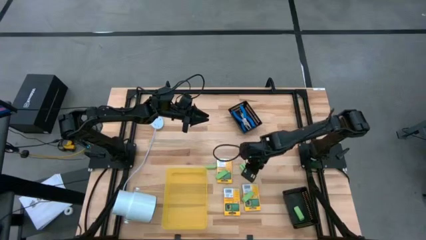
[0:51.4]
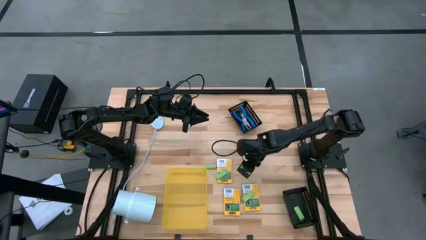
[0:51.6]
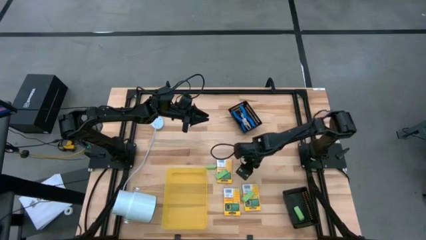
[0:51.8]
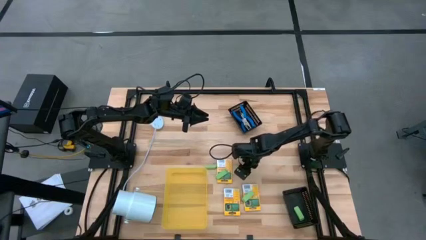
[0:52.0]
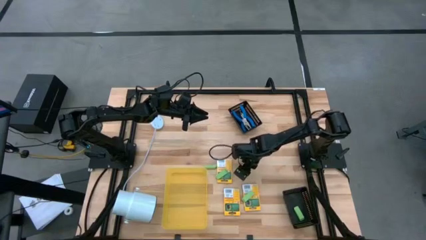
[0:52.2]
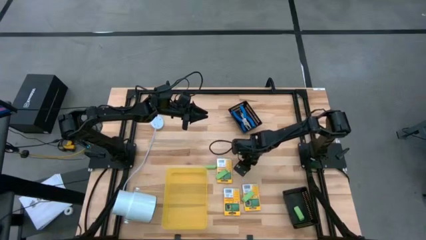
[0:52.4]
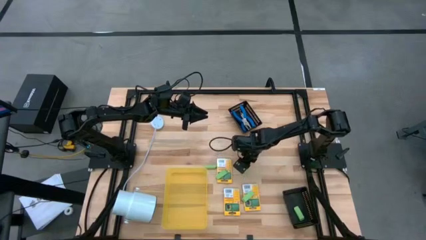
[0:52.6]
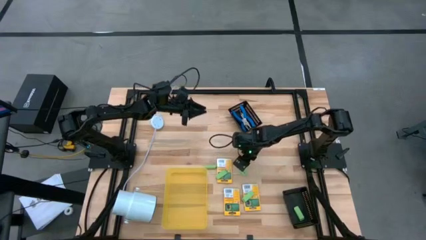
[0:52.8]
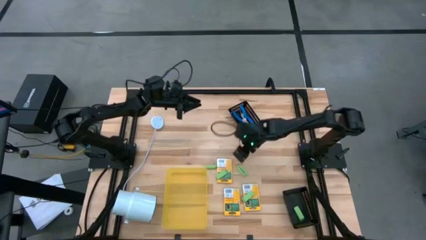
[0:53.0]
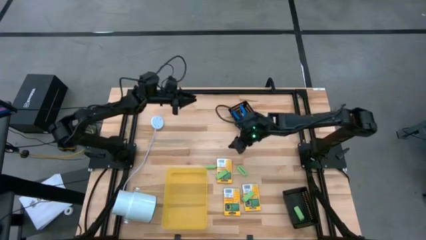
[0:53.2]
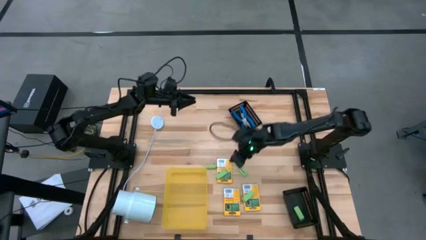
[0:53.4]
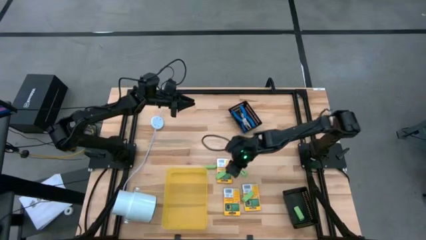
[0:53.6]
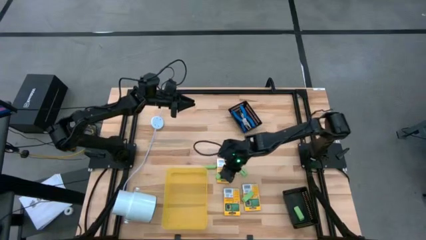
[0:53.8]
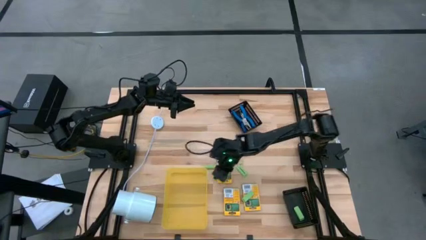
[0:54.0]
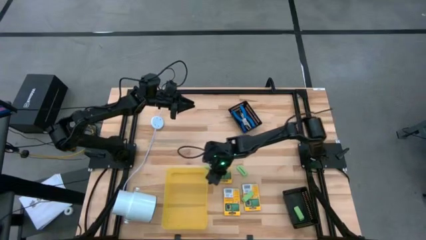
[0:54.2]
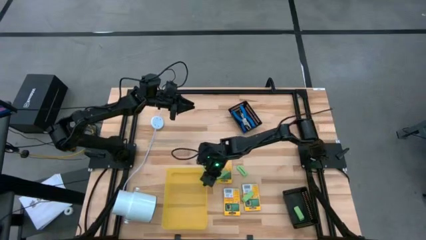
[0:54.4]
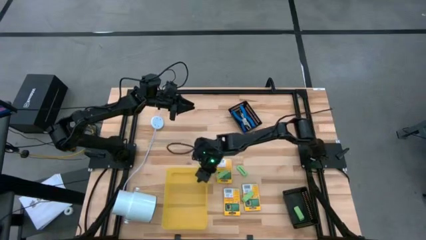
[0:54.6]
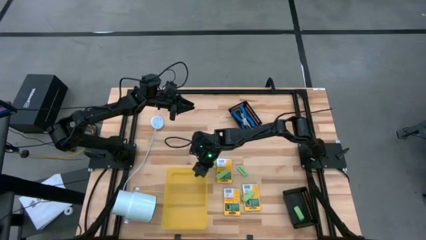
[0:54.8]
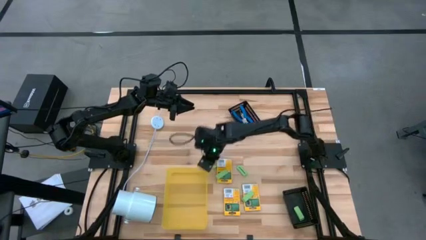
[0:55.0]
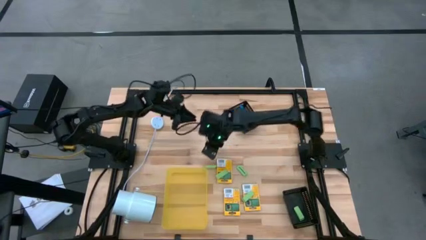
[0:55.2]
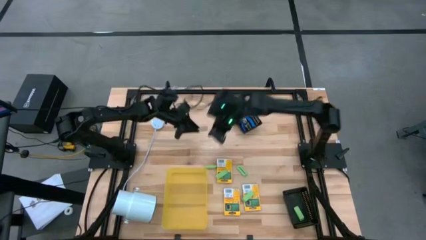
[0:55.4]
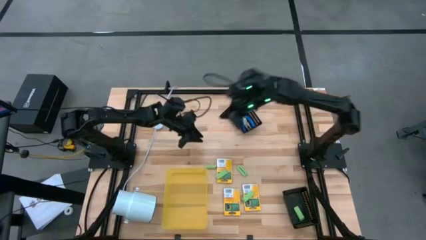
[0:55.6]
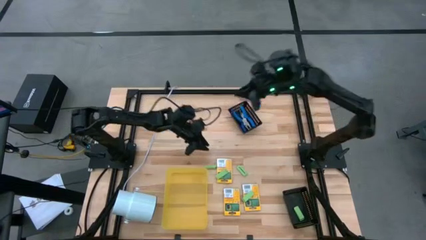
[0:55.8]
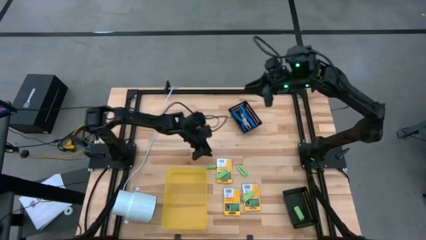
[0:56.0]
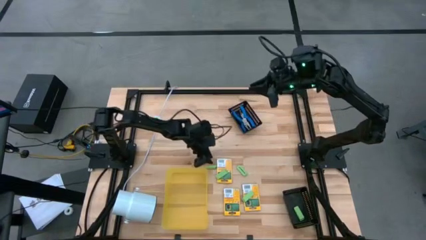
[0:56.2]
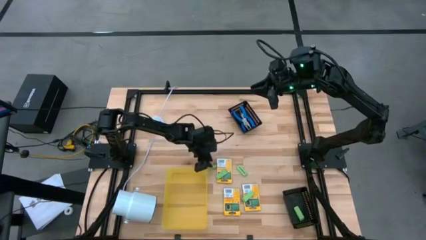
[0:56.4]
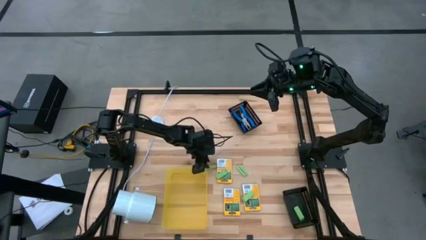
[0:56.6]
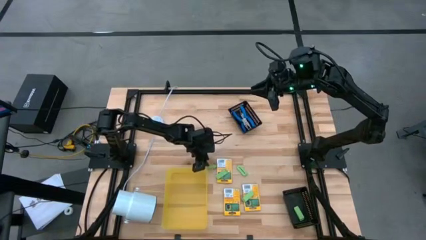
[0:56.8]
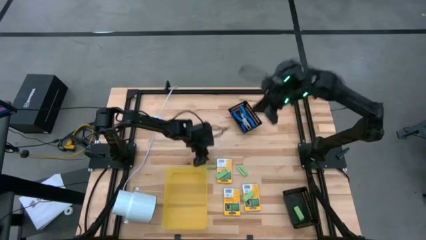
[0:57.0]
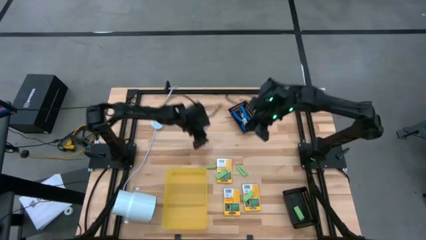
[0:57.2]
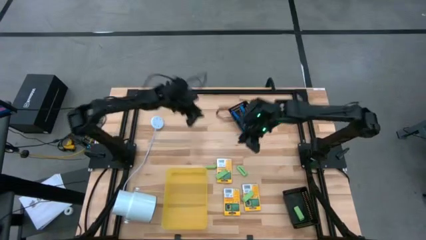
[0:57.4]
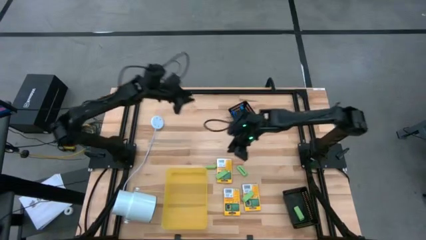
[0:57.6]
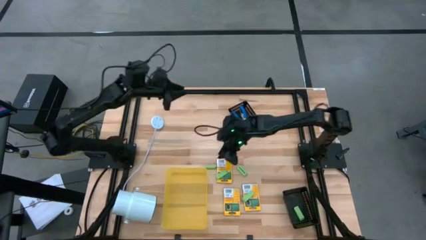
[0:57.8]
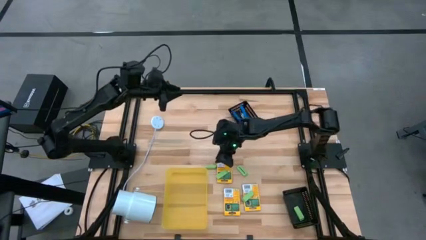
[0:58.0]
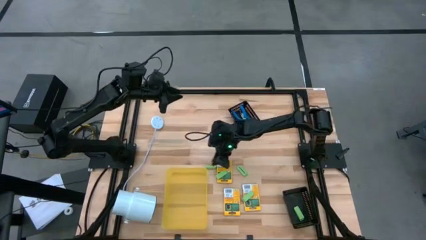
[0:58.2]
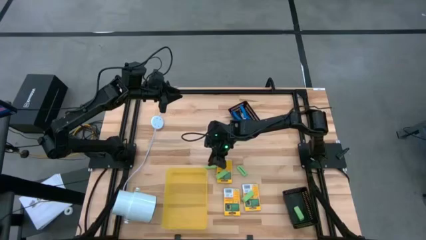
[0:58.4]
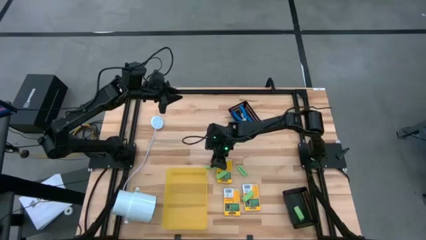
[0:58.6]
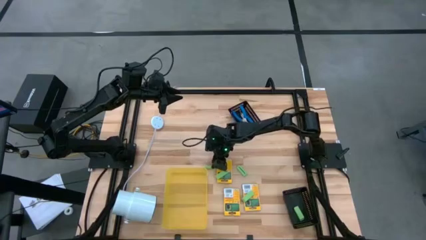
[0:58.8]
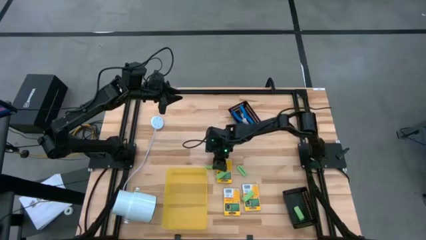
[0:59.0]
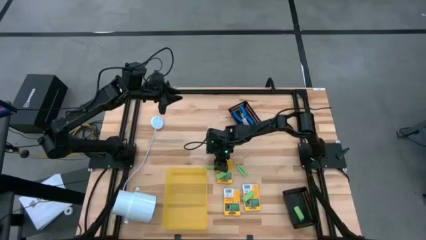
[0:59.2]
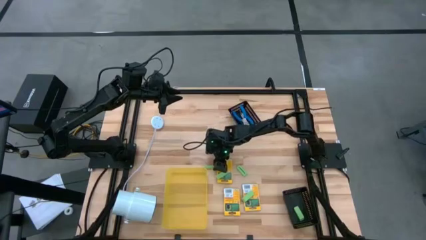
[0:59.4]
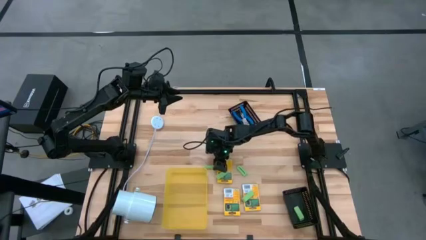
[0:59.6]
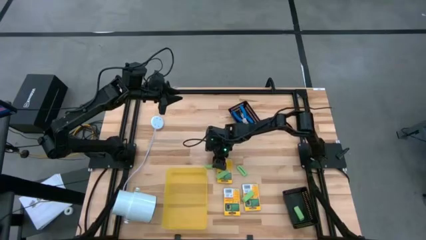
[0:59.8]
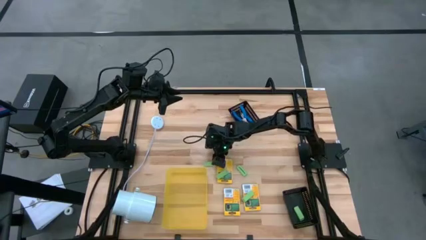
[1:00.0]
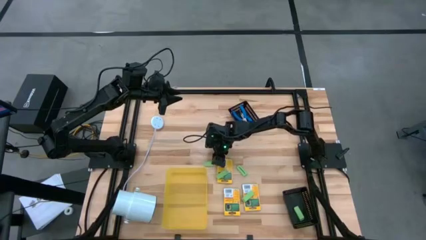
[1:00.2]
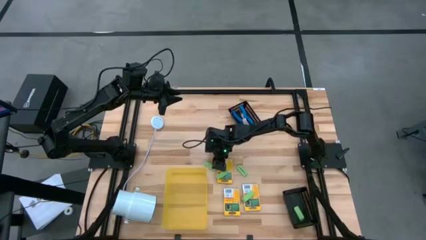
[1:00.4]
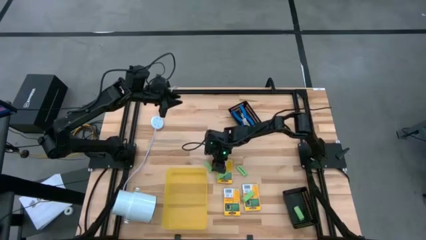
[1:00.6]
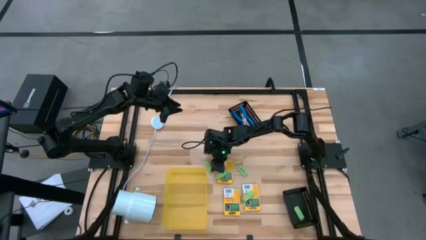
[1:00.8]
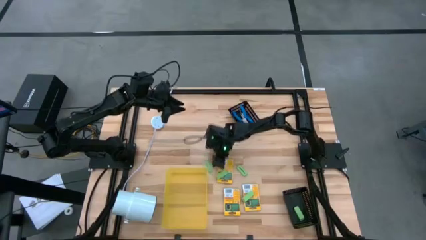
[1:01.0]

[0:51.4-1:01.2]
Task: Pick & Place School Supplies
Put the green eraser into the bottom black bin

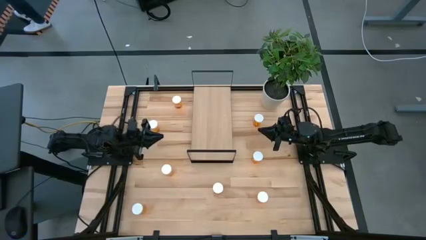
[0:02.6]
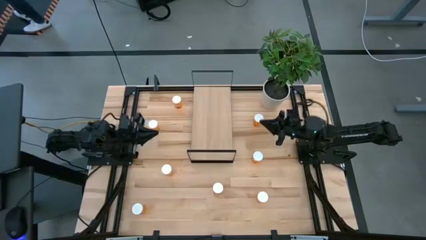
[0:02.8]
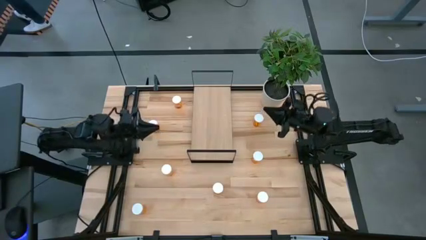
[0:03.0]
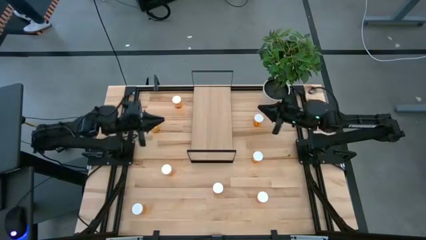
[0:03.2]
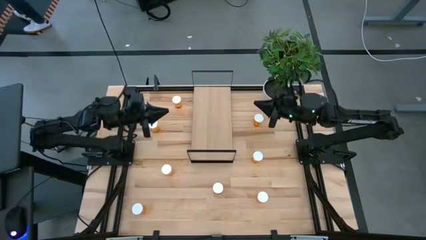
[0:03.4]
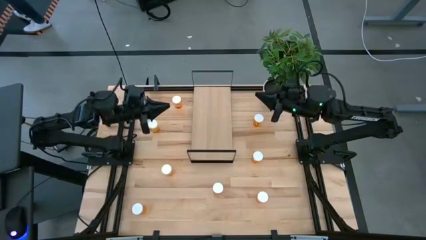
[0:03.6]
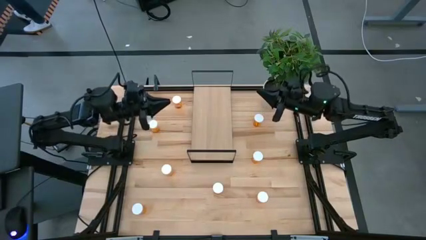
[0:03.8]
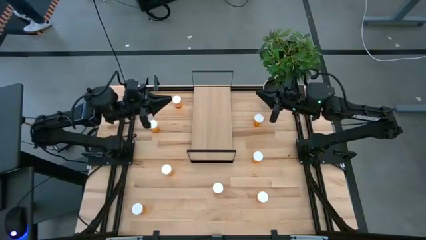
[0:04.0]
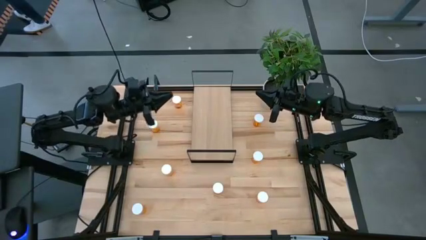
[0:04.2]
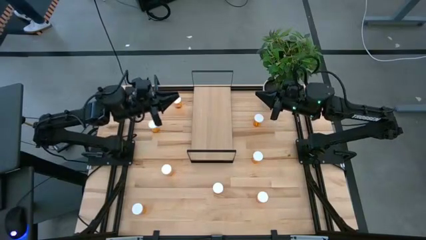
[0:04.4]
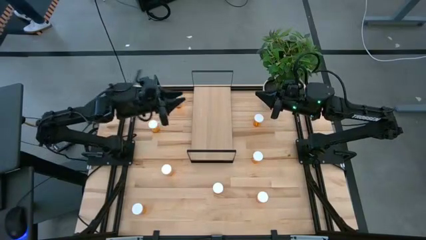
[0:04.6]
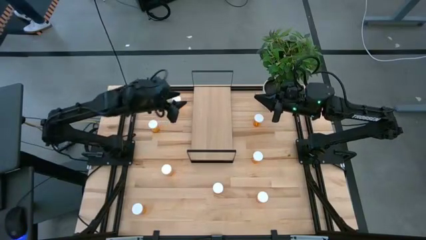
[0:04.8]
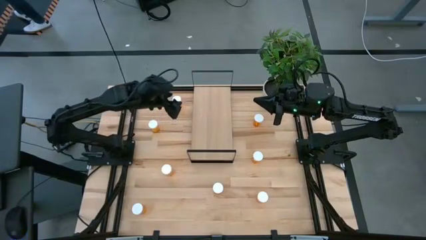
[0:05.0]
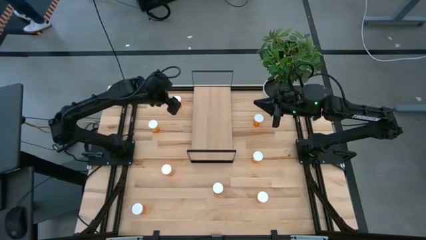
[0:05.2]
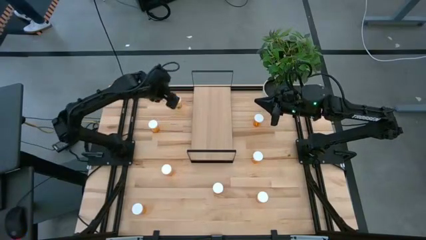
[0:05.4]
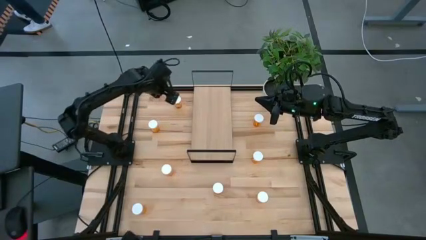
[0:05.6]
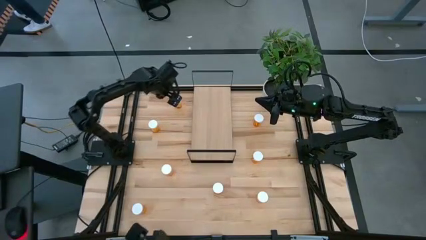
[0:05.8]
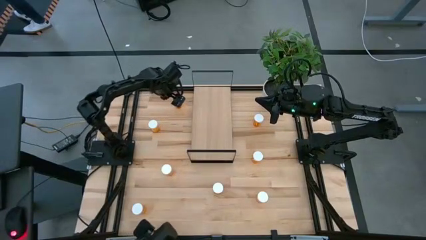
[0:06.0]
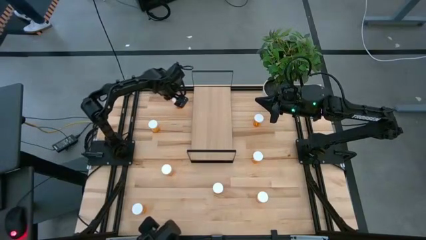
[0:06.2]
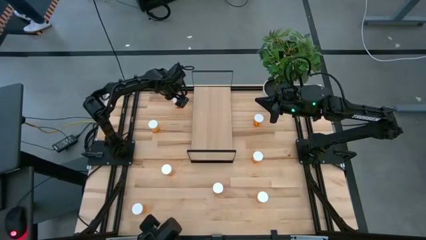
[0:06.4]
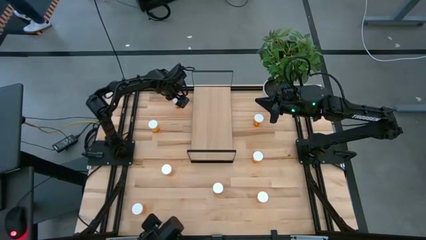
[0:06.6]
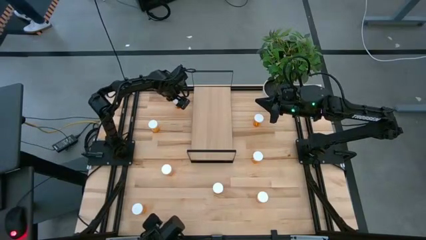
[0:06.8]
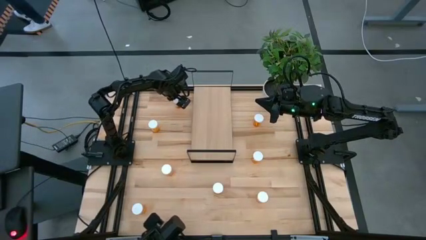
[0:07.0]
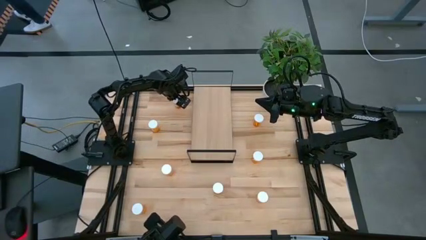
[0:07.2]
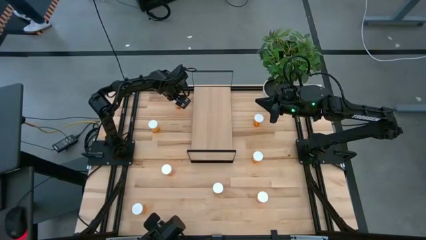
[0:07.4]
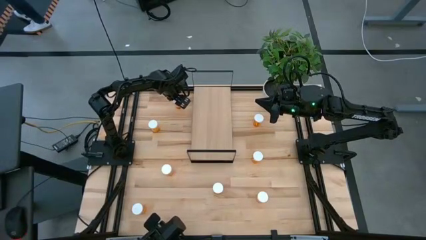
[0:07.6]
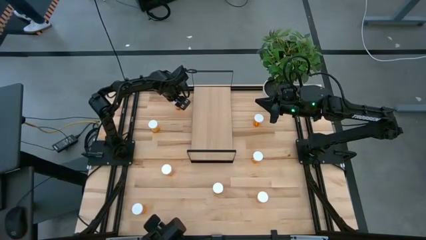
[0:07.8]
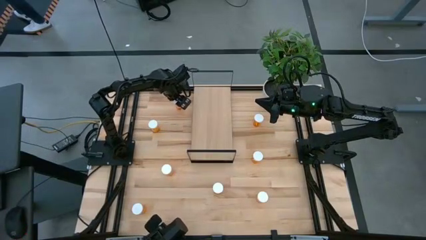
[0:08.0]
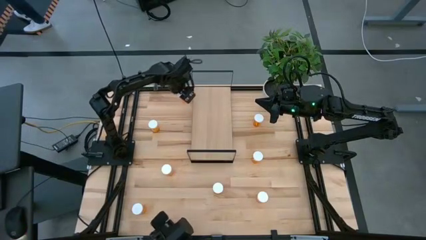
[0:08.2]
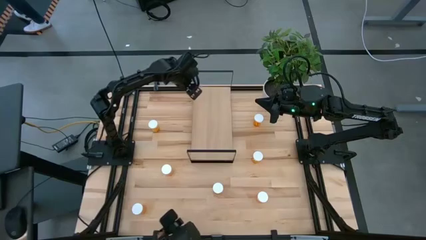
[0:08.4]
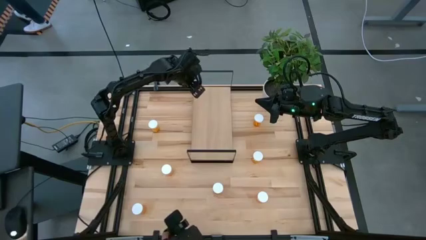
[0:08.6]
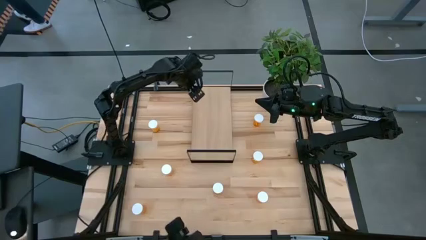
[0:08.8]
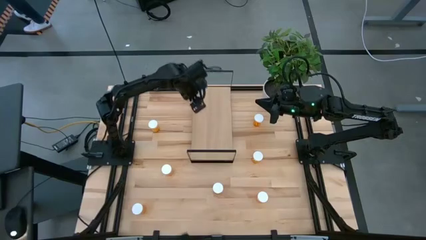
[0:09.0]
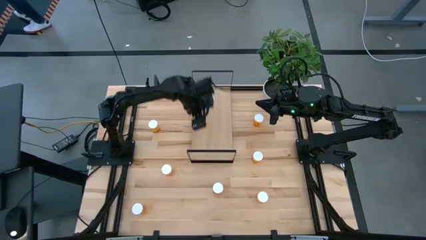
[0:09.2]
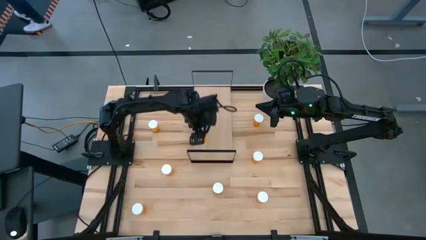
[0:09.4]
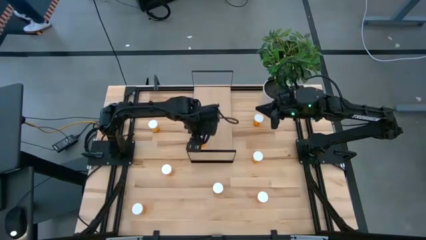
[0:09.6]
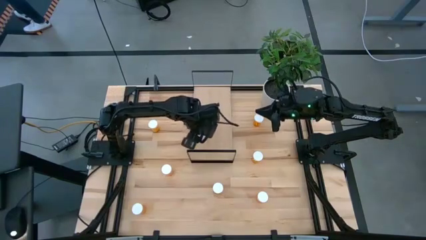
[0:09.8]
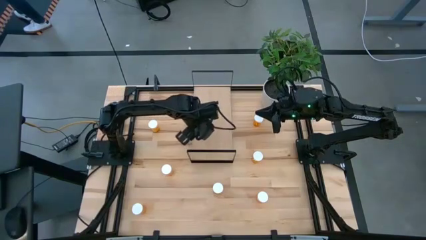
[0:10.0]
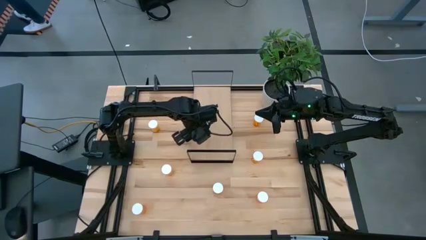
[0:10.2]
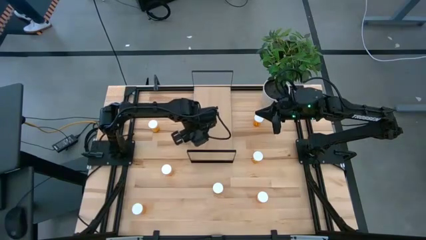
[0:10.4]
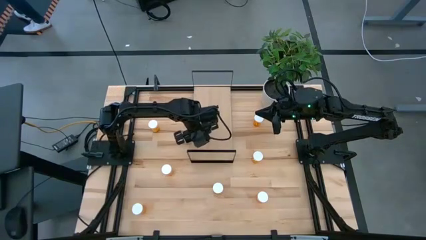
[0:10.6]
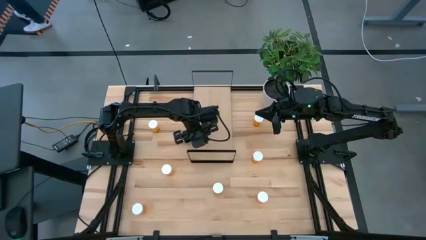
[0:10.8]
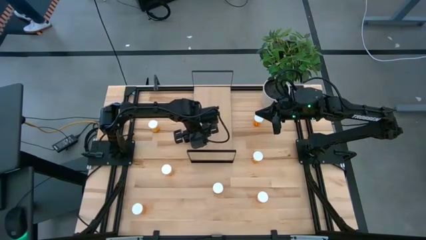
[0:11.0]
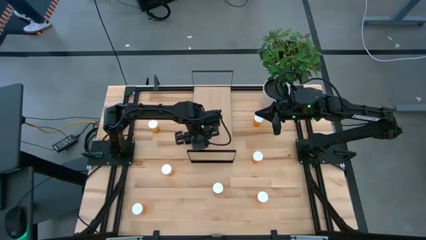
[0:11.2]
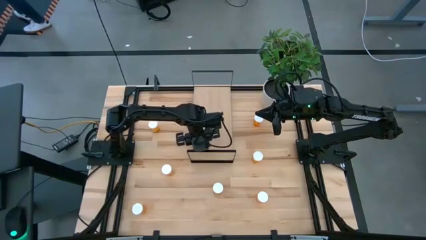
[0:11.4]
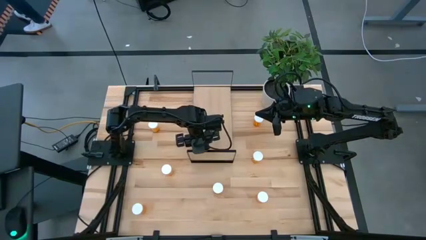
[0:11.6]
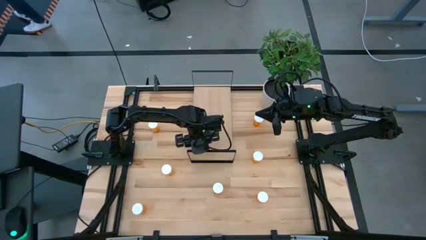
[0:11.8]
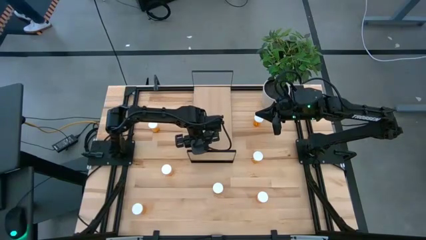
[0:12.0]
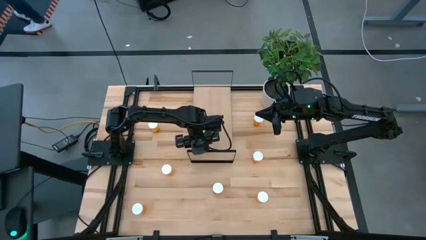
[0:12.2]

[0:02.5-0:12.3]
Task: Pick and place medicine bottles onto shelf by color
Put the orange pill bottle on the shelf
